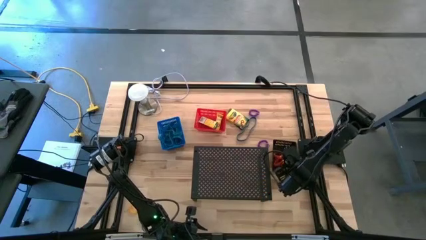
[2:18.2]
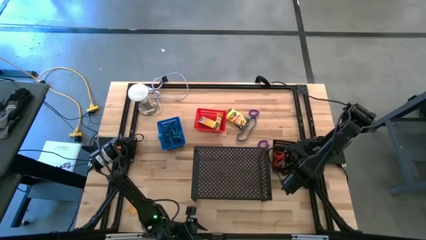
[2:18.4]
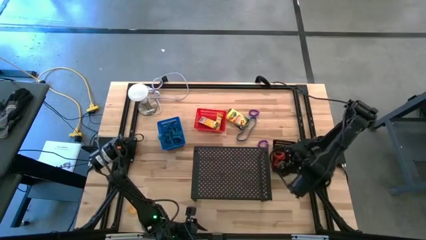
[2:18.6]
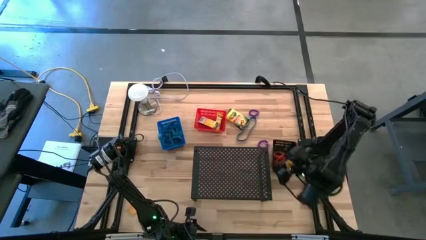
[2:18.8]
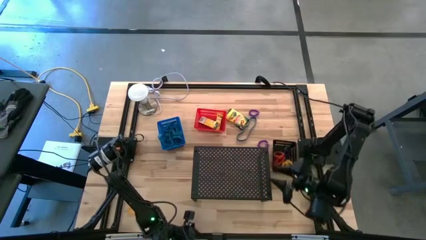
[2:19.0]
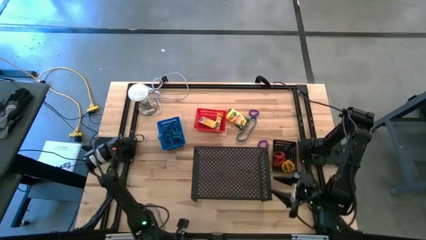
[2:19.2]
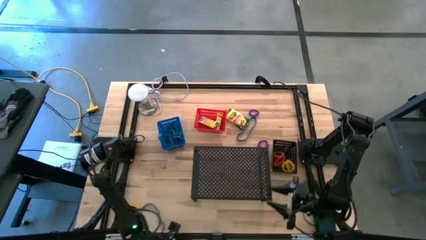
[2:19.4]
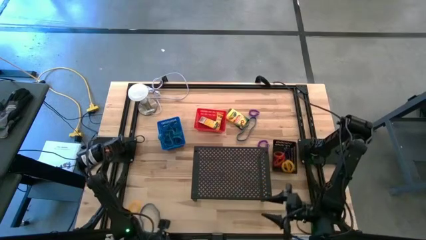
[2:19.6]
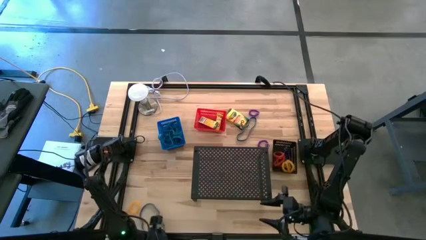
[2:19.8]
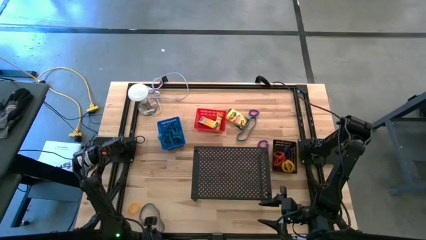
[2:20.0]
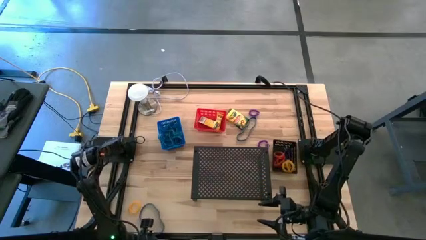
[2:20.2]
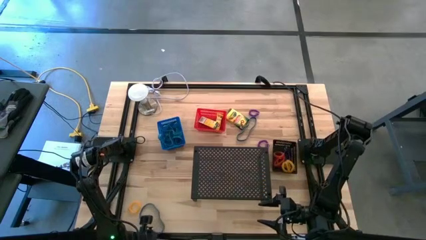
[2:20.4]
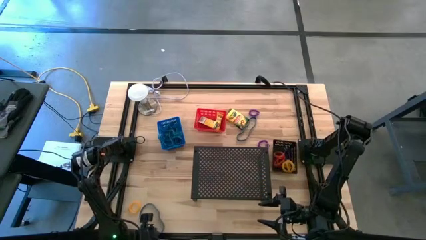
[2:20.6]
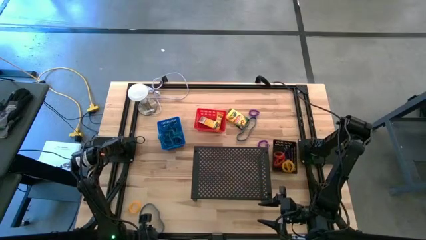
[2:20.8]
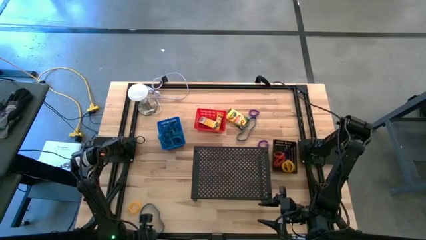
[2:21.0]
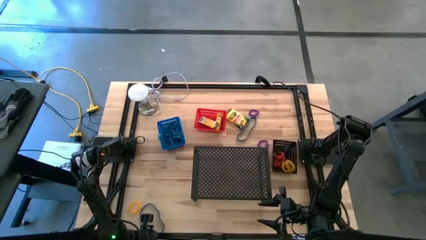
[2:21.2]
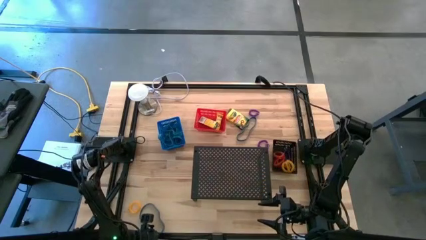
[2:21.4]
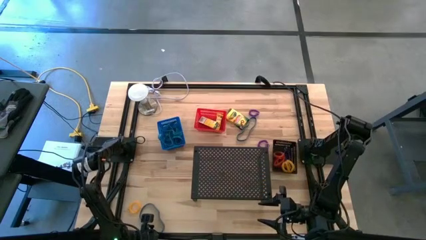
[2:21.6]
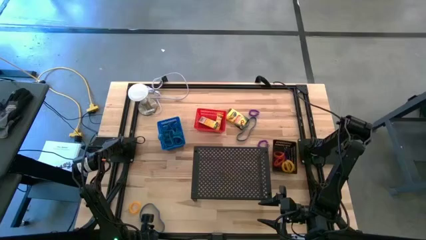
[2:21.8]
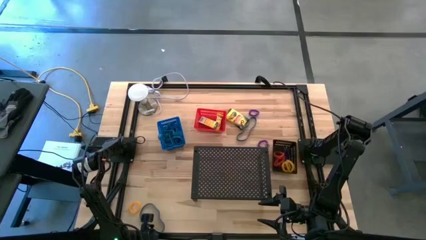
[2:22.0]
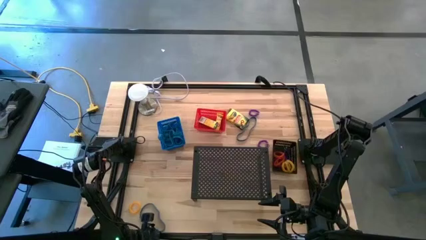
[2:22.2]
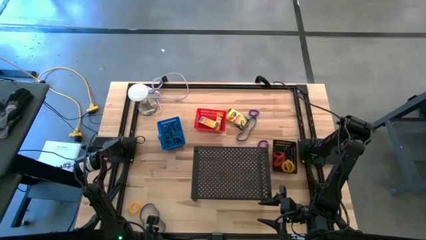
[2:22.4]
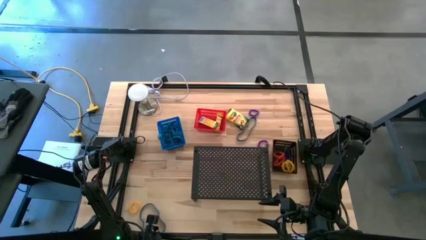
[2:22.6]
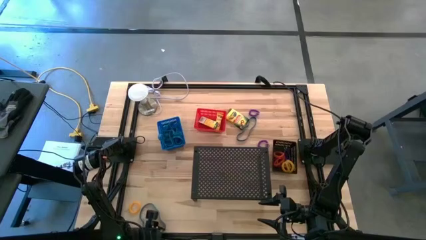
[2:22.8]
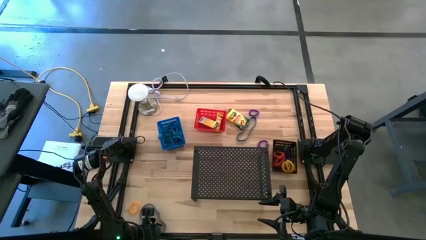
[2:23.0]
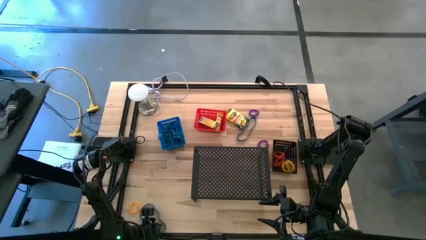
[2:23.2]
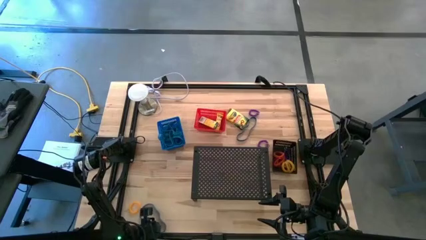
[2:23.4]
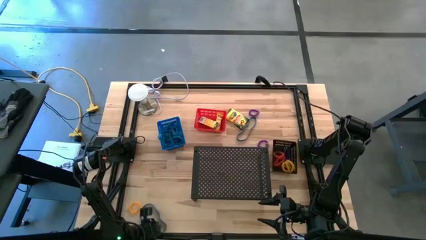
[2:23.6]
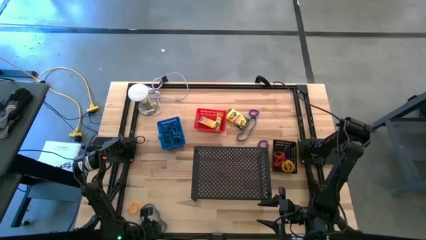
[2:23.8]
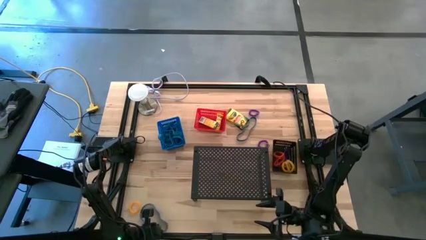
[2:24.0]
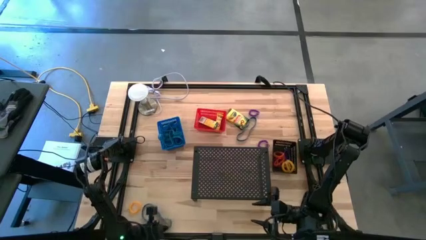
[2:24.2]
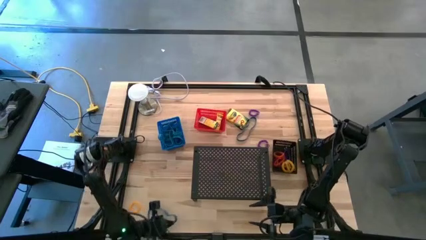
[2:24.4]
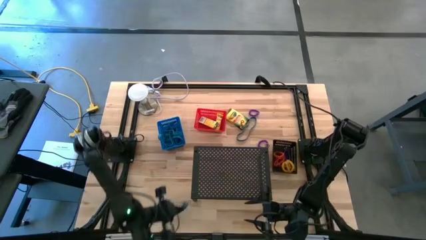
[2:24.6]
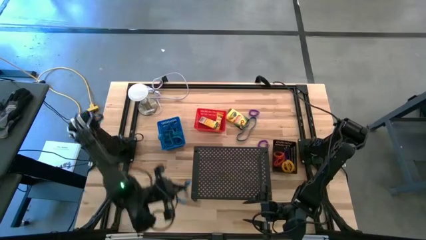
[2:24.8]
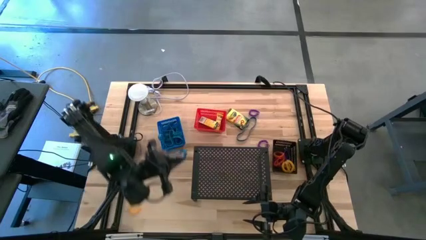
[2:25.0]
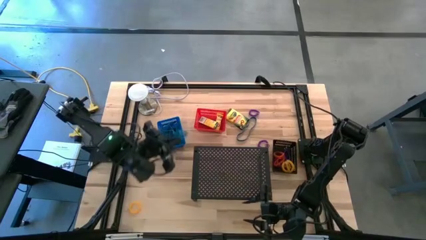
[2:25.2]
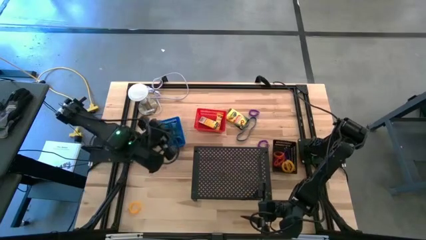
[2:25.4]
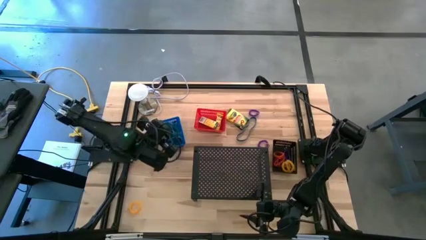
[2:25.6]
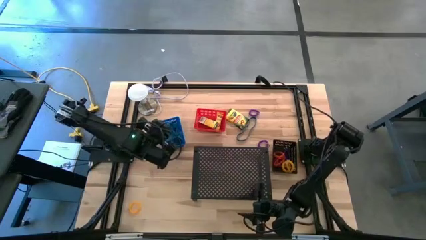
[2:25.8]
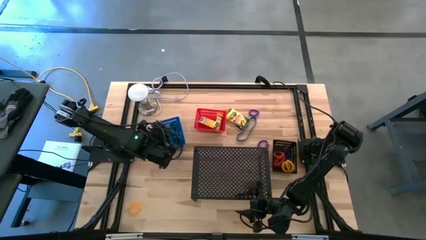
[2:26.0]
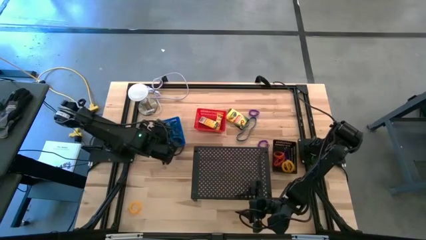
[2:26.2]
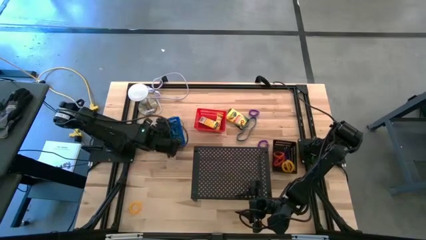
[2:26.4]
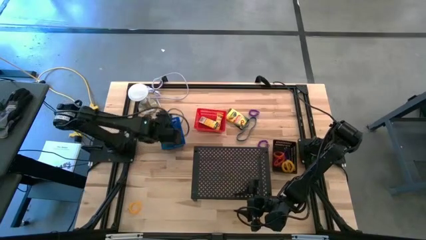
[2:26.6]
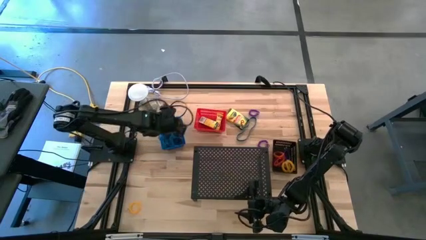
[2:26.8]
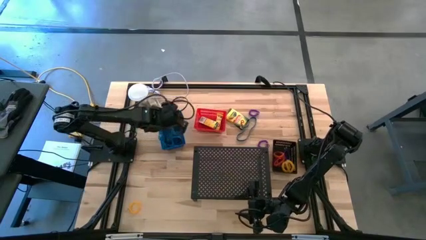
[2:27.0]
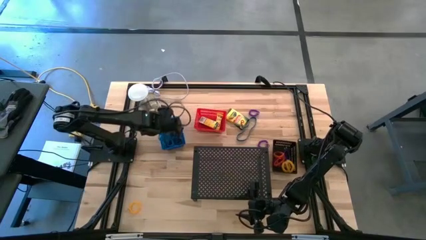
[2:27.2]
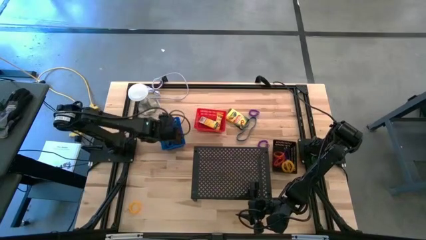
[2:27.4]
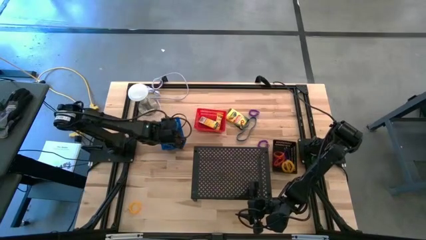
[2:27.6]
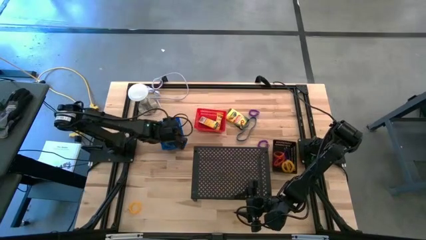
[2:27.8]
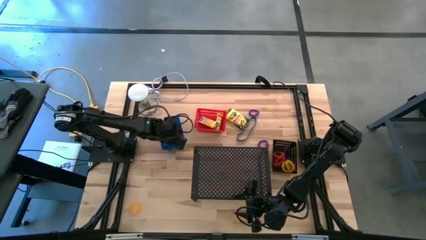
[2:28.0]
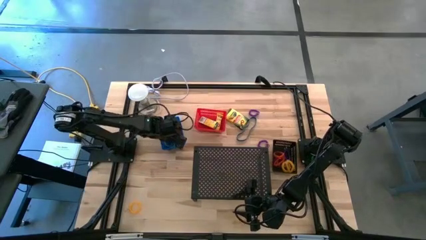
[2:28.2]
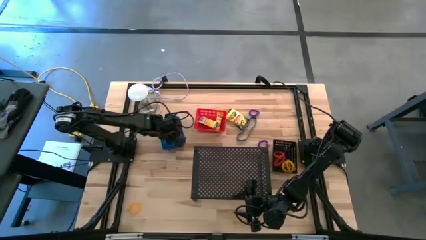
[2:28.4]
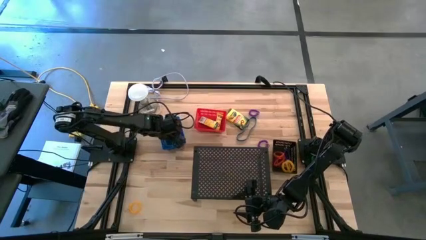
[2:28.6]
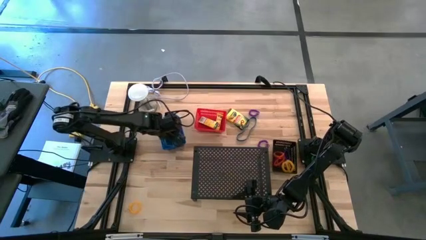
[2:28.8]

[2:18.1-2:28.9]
Task: Pick & Place Office Desk Supplies
Put the blue rubber band into the blue bin

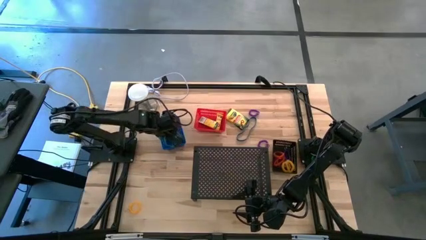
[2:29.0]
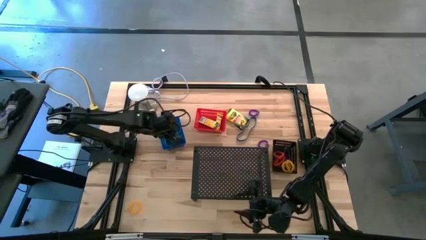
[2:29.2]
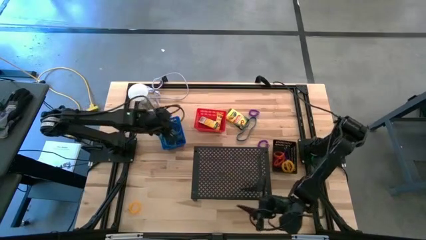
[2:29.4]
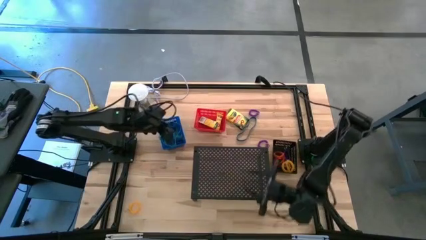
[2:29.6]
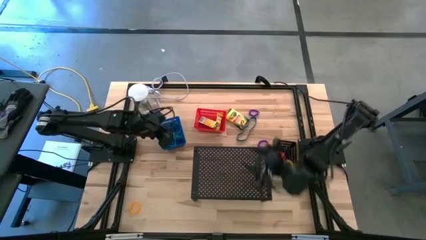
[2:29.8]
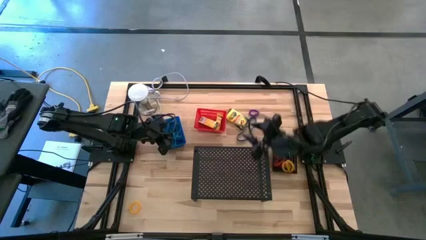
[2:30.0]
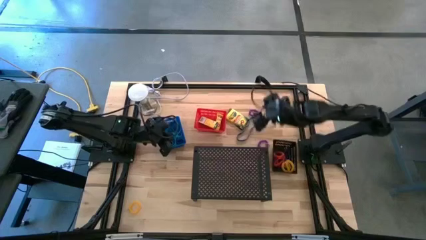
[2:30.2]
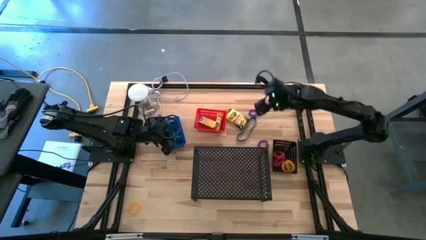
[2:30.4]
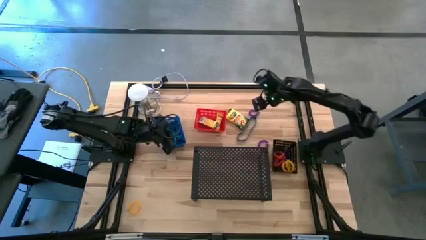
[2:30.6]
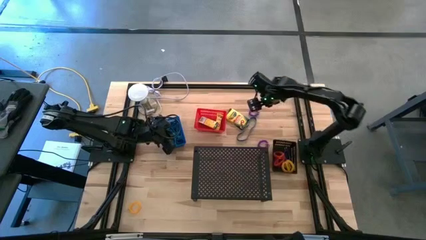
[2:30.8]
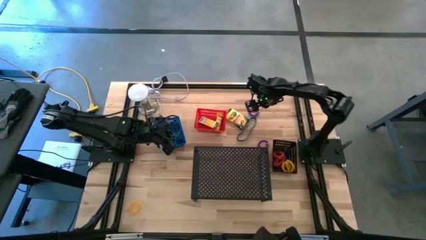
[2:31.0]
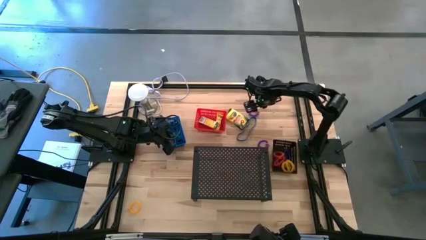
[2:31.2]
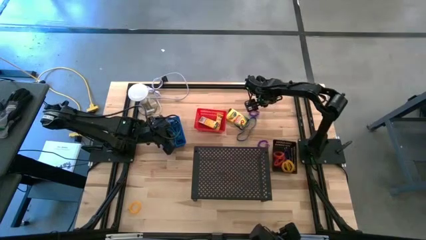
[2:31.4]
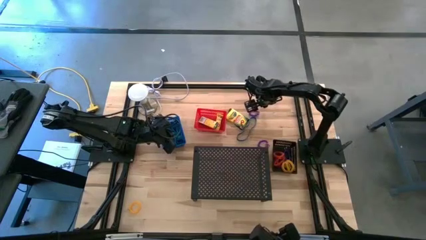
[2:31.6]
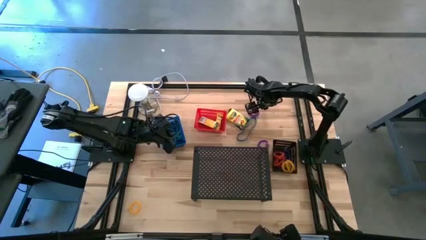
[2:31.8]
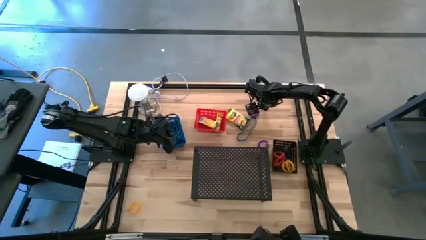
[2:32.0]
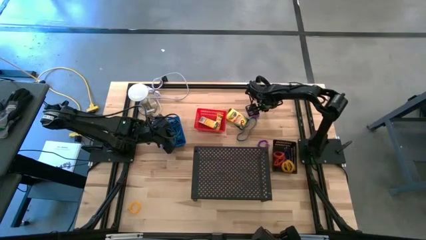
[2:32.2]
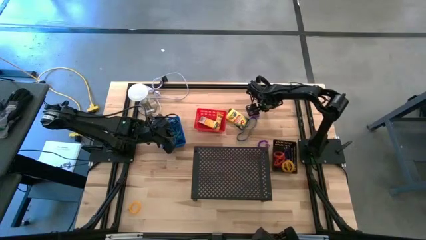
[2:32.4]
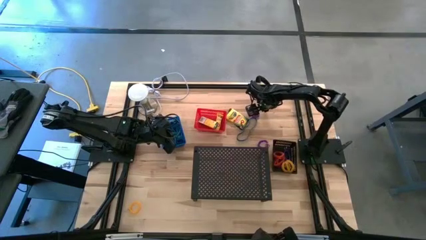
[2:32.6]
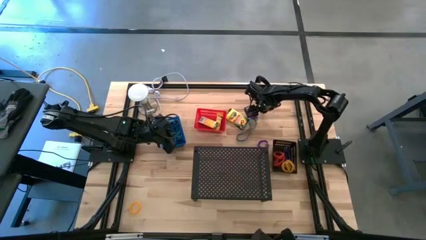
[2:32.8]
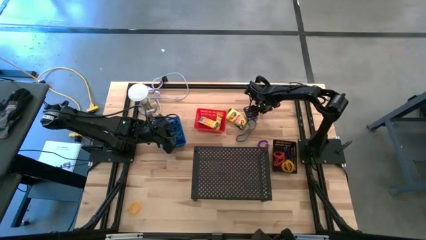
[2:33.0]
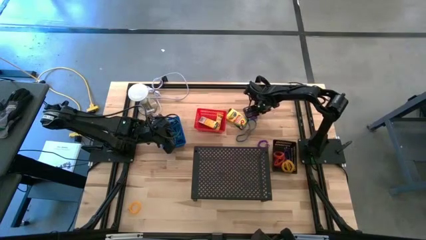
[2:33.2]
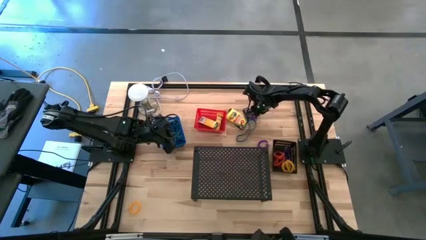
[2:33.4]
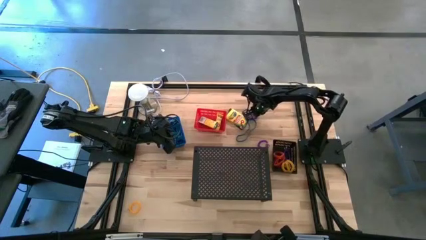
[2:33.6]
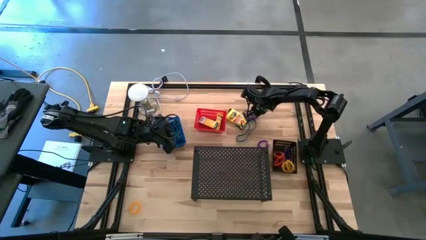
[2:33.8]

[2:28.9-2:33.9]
Put the purple spring keychain into the black bin

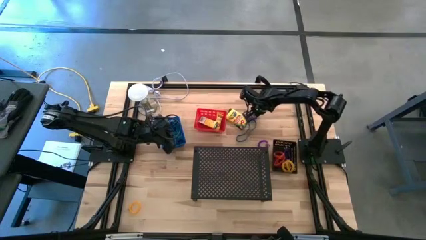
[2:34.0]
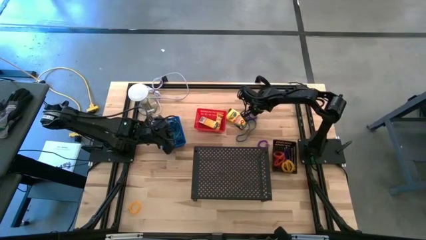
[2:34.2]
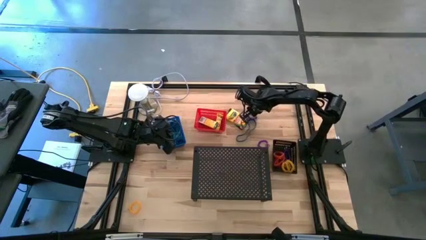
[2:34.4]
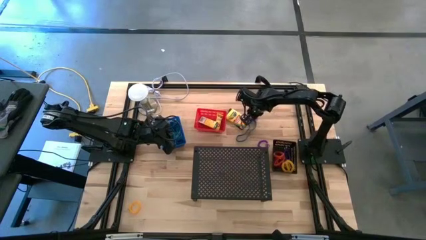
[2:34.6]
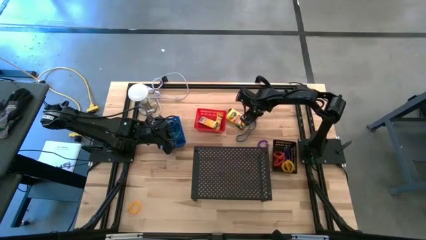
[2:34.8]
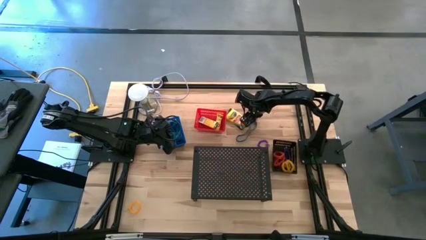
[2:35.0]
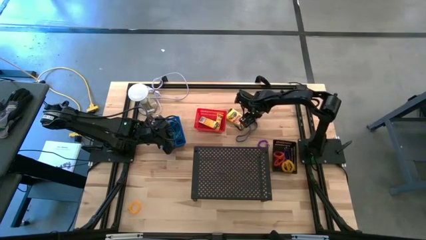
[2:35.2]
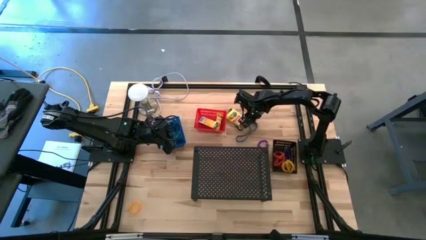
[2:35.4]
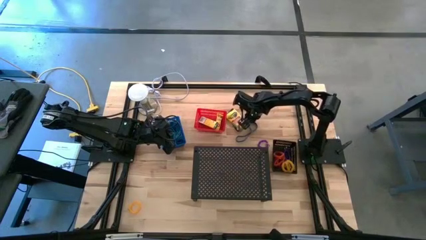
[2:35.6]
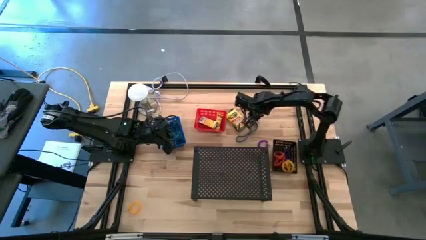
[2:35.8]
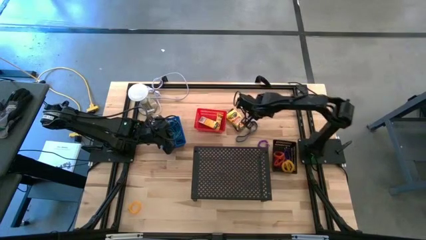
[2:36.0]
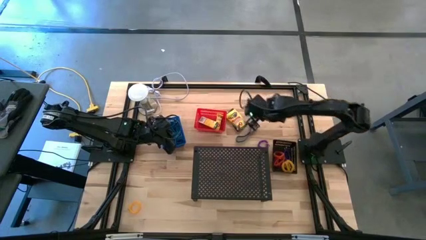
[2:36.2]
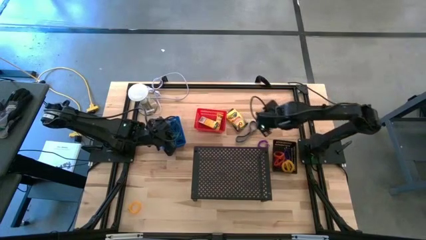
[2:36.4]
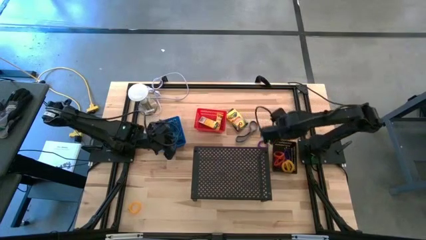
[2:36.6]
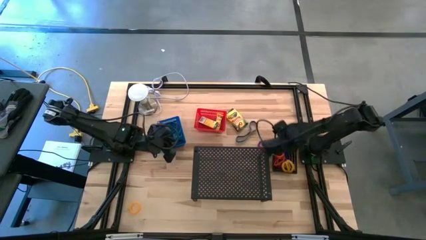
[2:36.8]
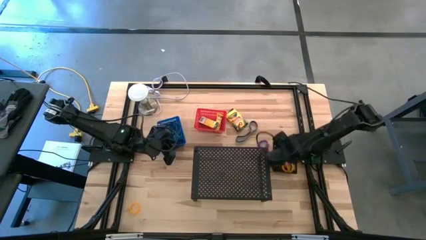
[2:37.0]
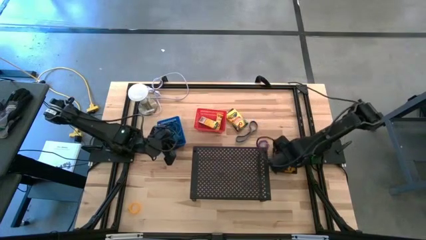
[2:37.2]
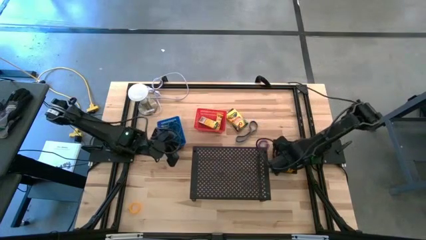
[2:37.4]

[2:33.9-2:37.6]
Put the purple spring keychain into the black bin
